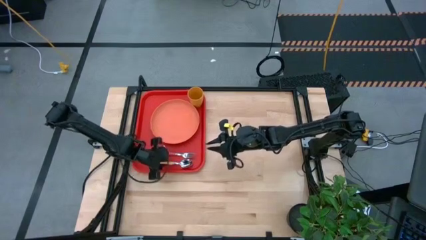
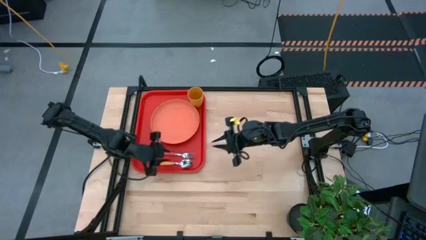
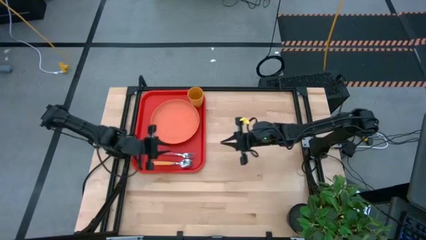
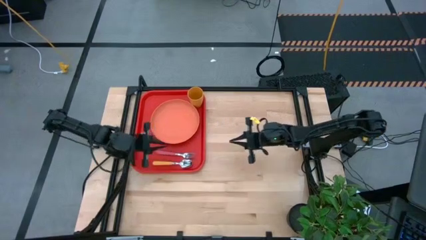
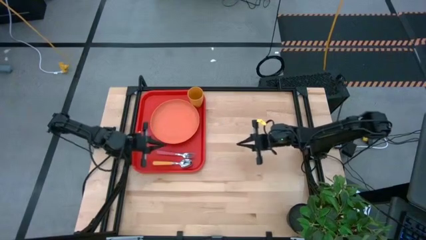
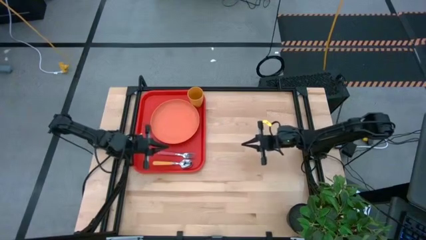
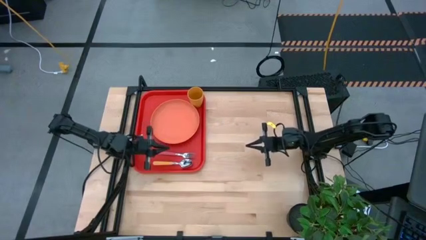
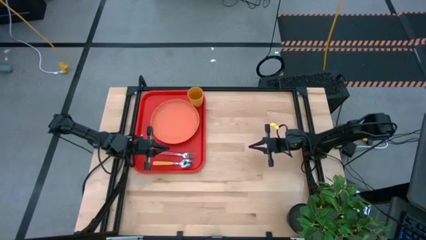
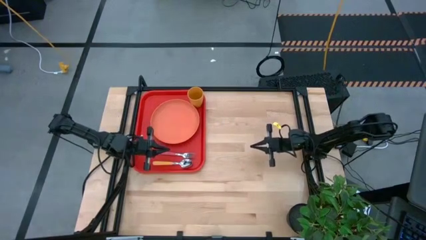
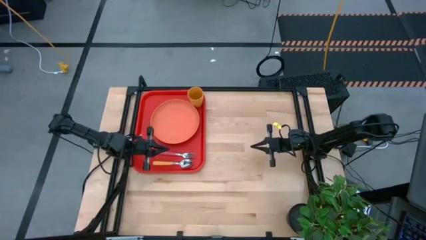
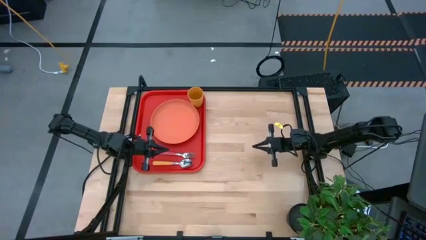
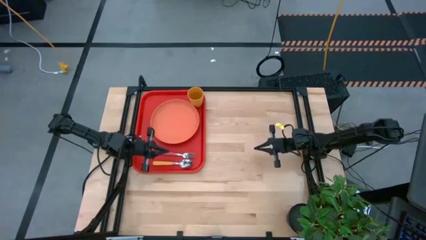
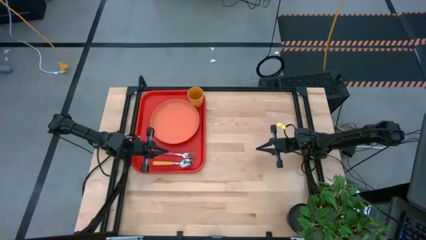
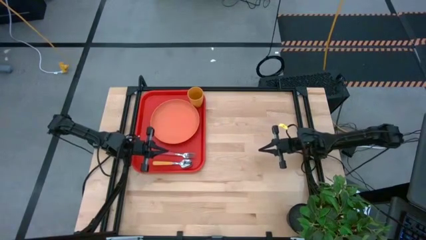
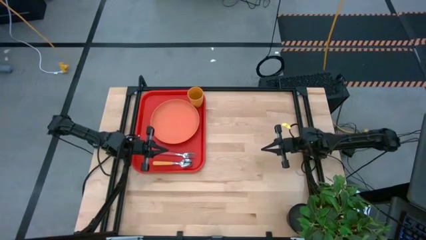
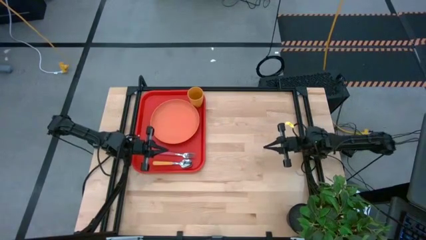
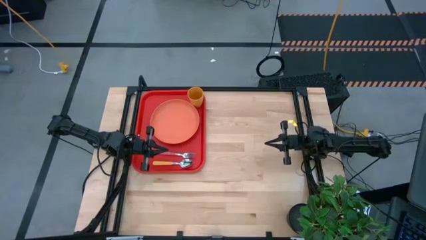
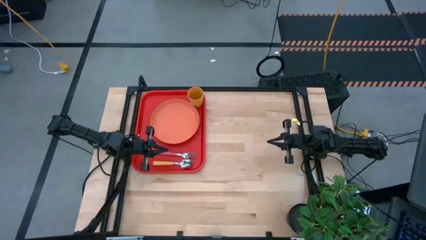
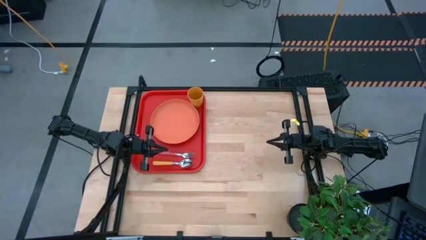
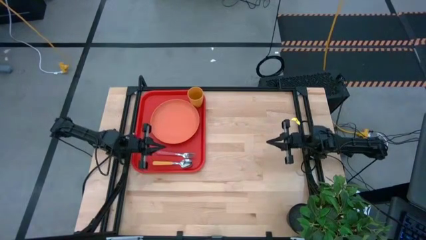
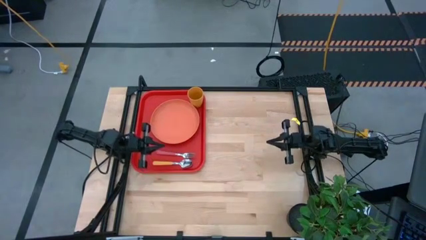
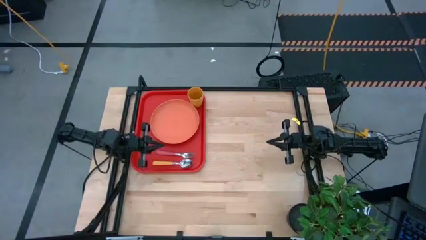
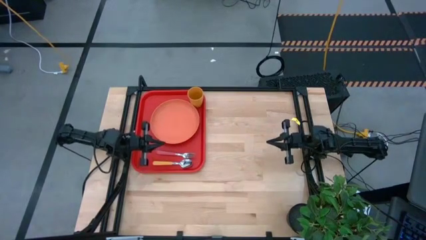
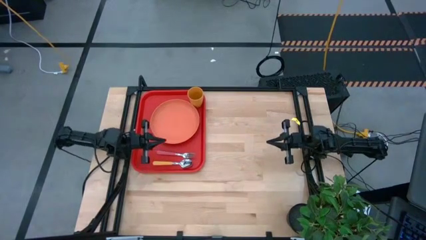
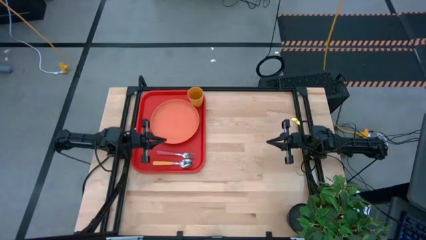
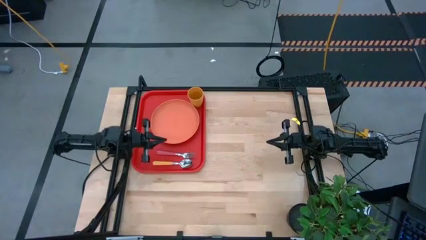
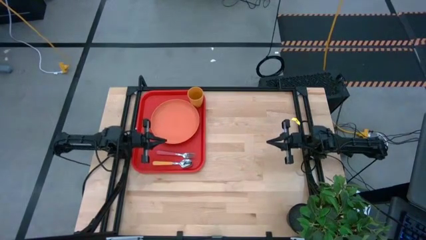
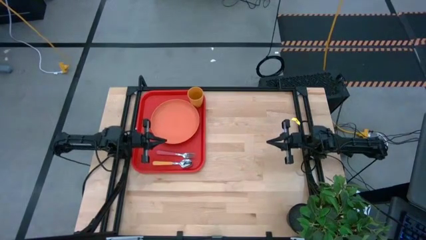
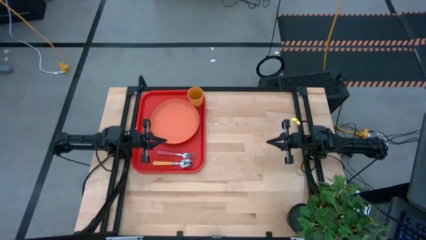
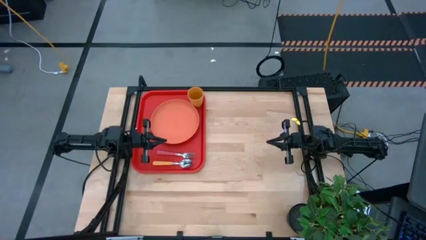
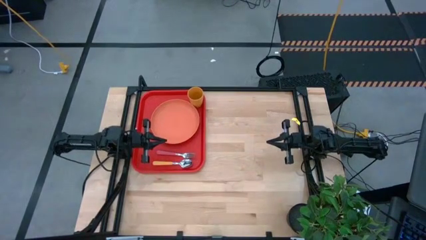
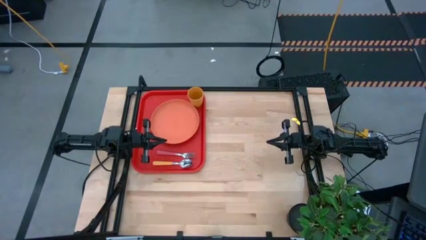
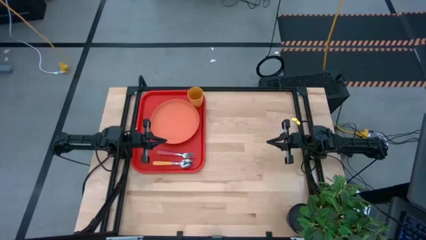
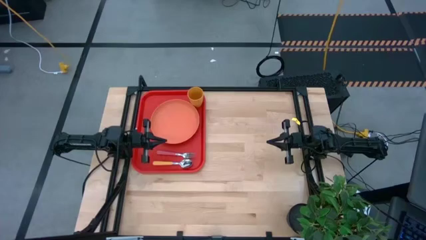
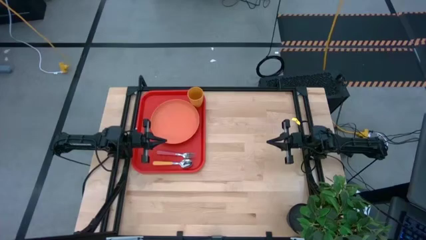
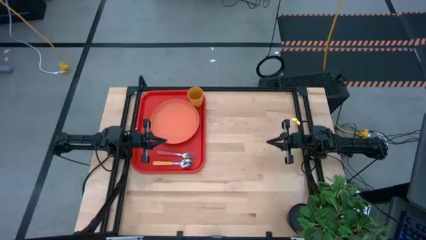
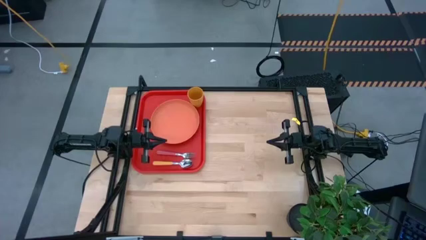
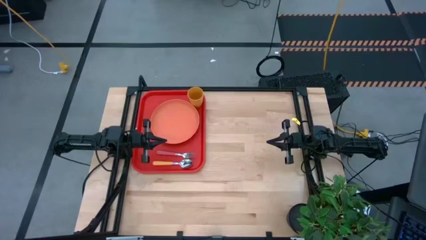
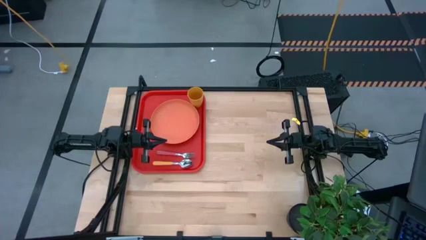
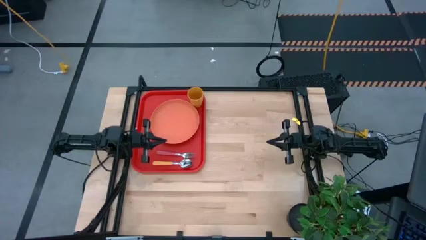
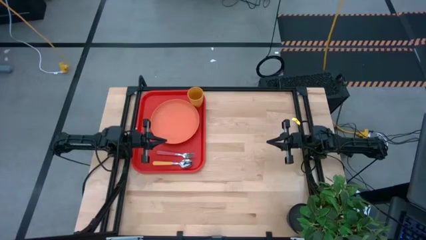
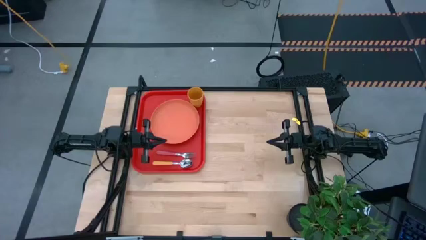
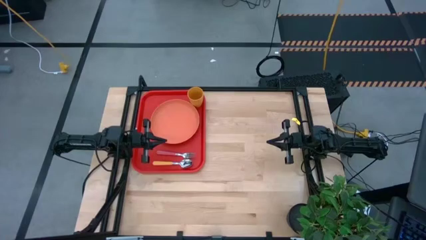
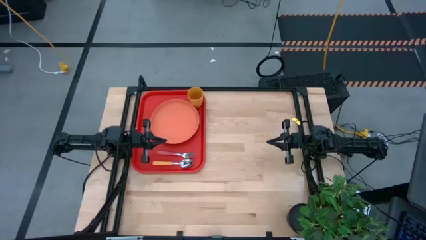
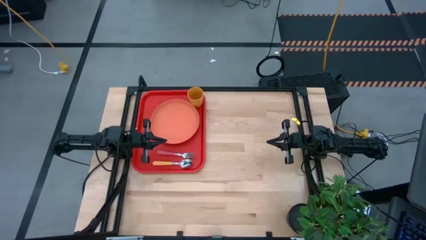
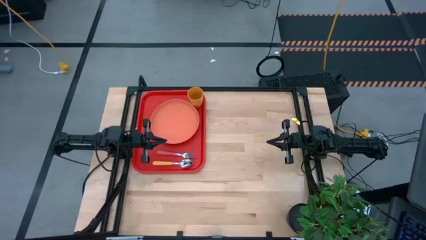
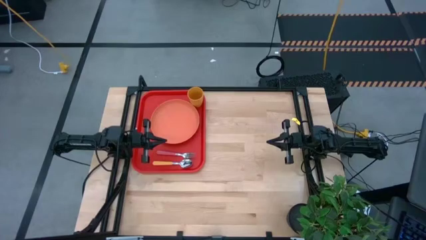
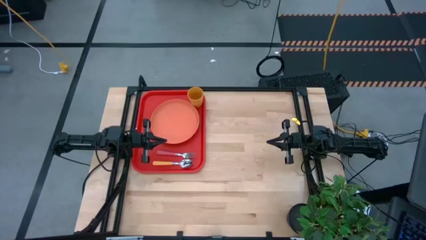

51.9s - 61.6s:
Task: Pick and place plate/cup/fork/spoon on tray
Return to Home Position
